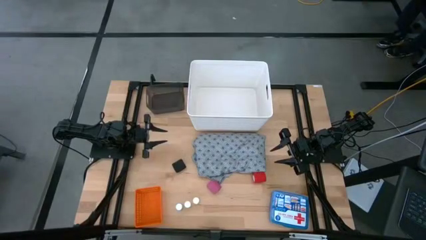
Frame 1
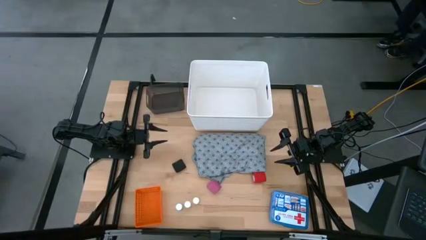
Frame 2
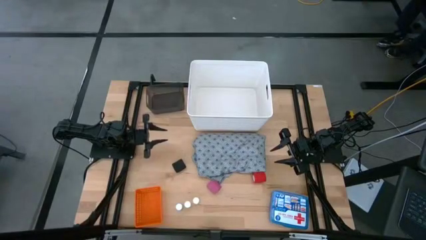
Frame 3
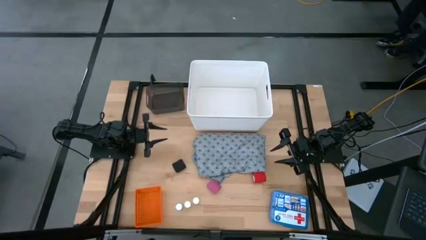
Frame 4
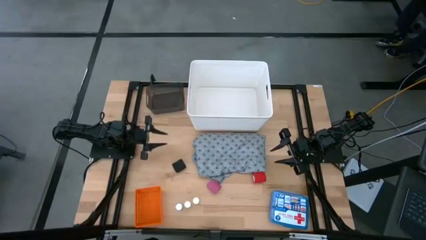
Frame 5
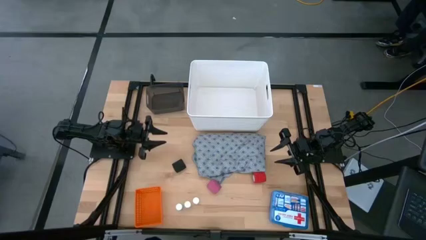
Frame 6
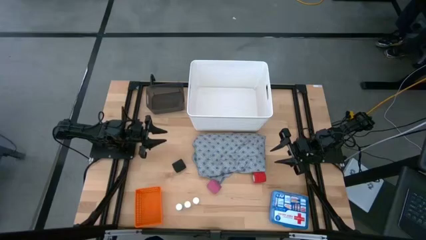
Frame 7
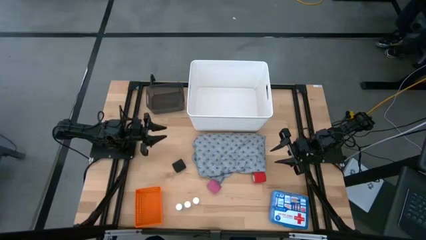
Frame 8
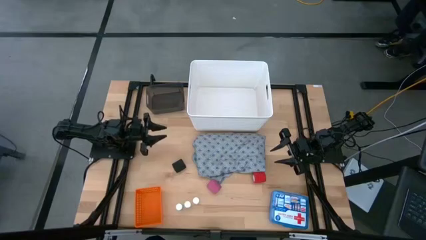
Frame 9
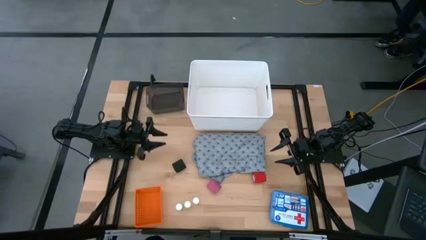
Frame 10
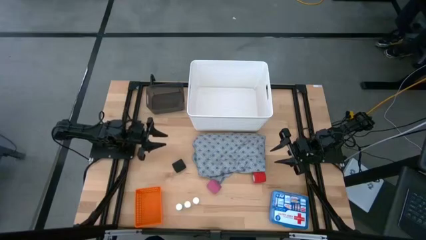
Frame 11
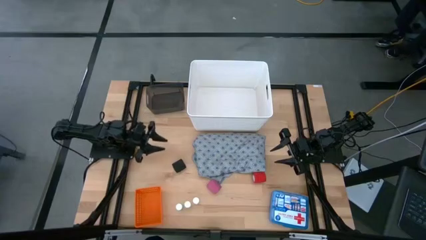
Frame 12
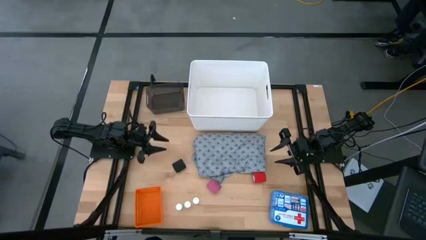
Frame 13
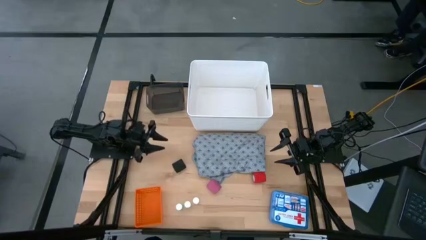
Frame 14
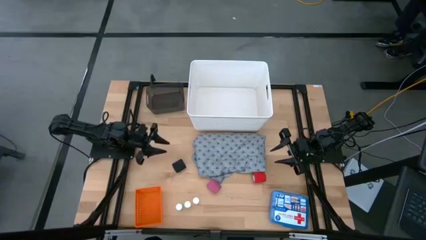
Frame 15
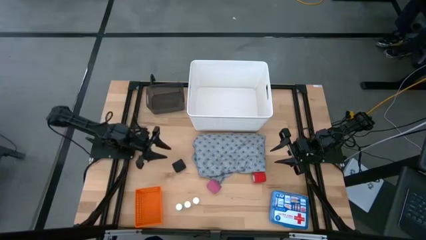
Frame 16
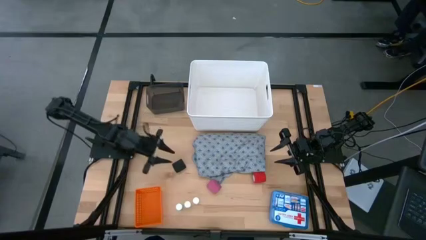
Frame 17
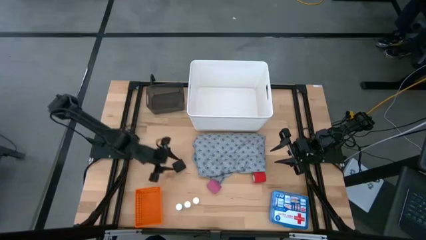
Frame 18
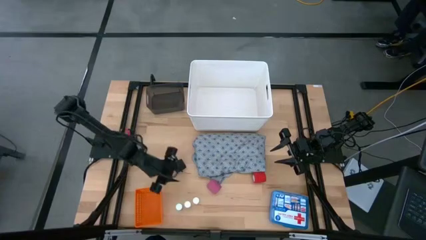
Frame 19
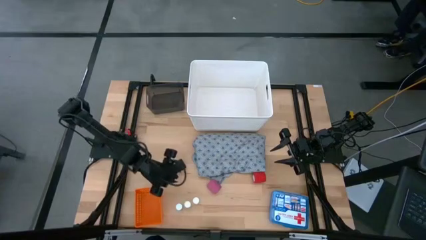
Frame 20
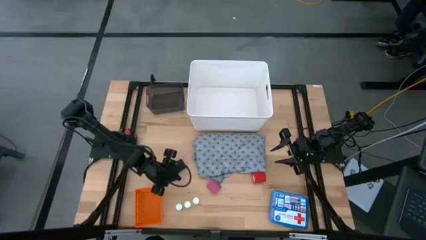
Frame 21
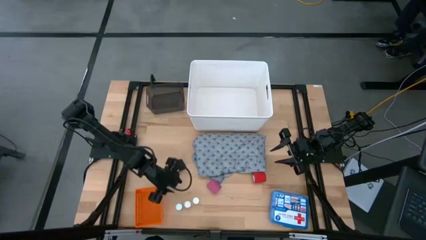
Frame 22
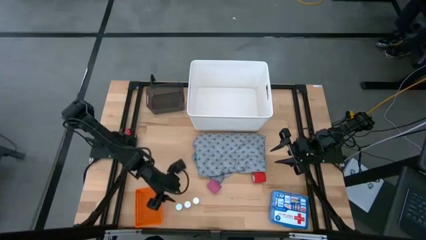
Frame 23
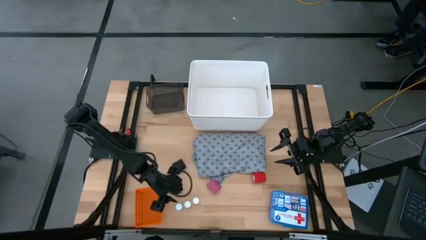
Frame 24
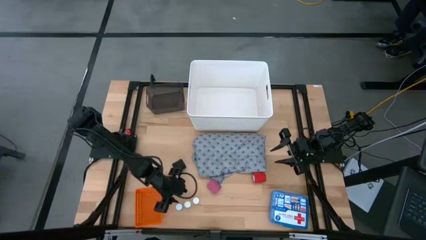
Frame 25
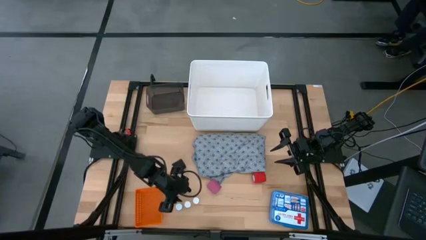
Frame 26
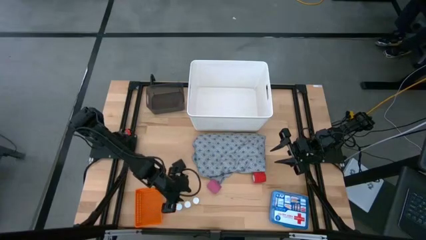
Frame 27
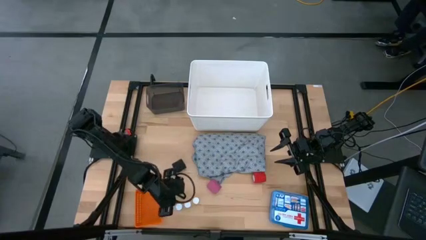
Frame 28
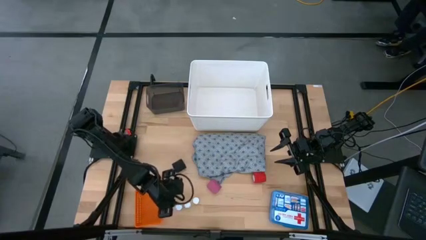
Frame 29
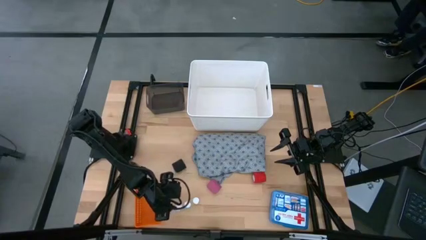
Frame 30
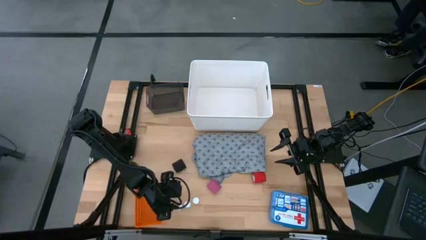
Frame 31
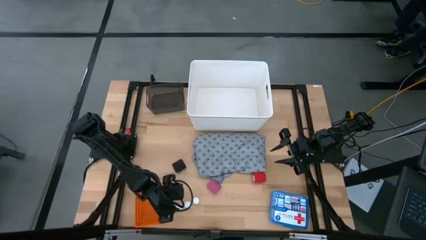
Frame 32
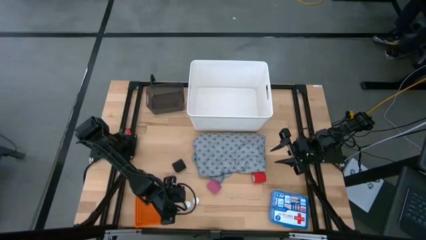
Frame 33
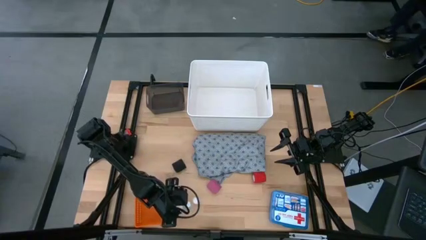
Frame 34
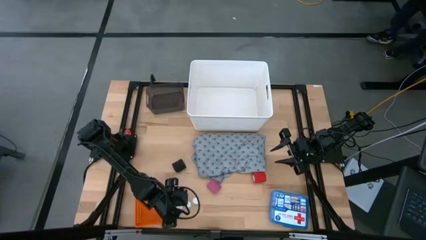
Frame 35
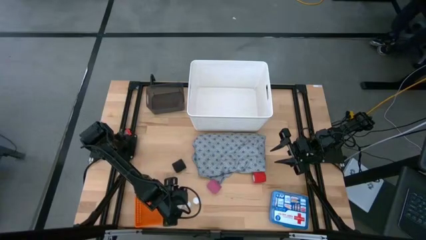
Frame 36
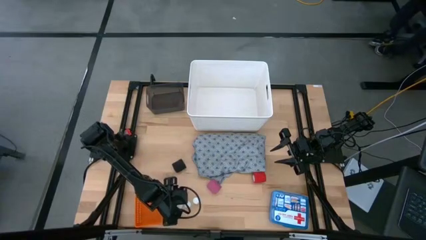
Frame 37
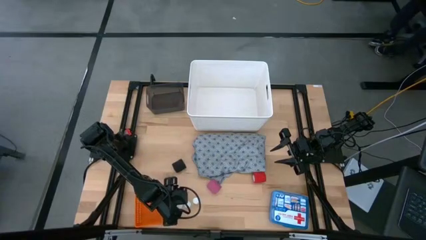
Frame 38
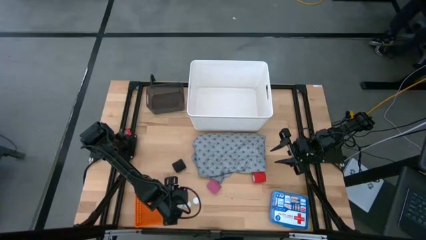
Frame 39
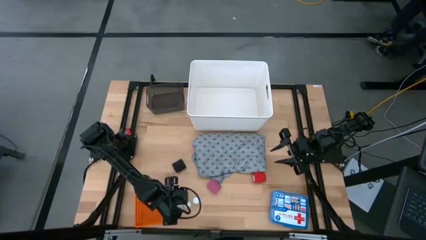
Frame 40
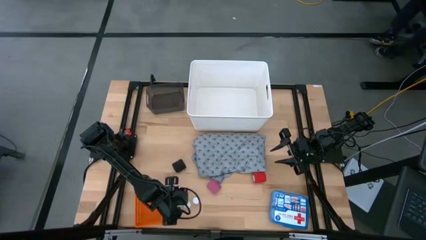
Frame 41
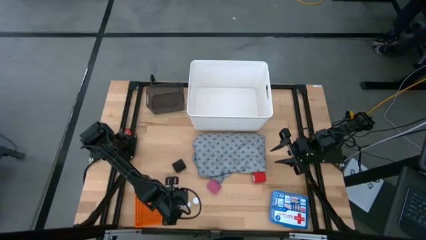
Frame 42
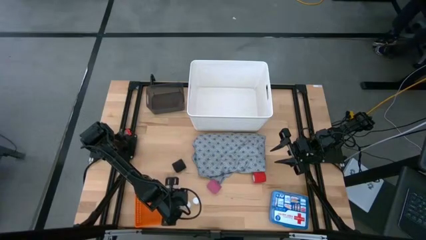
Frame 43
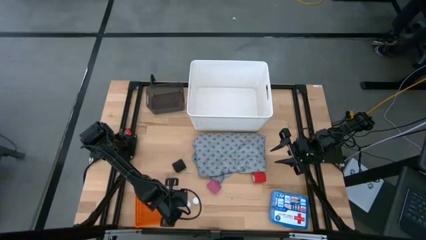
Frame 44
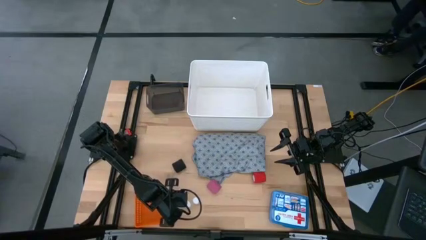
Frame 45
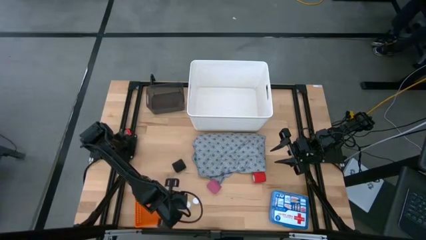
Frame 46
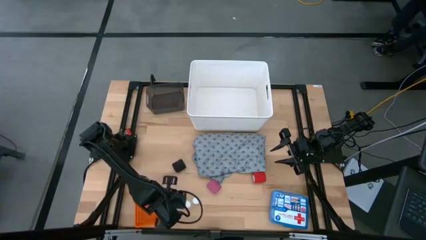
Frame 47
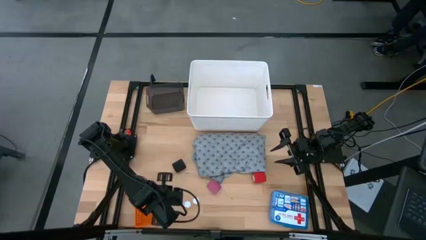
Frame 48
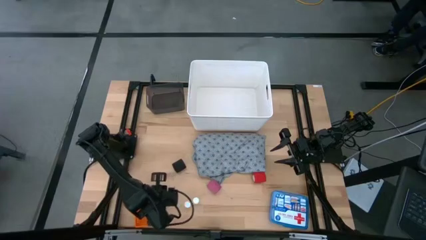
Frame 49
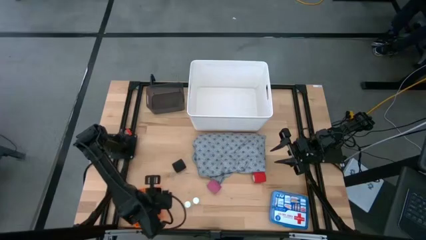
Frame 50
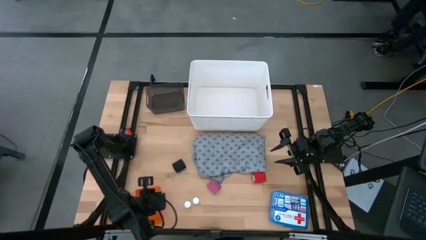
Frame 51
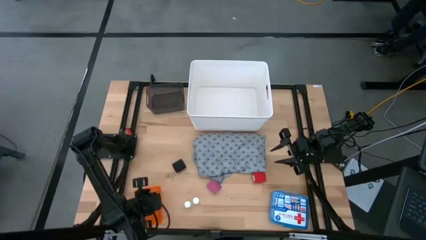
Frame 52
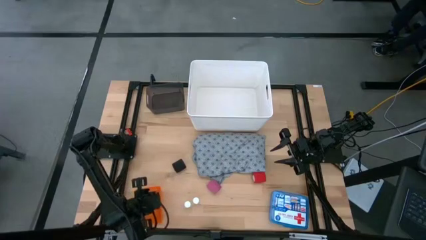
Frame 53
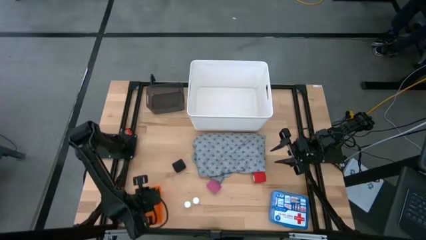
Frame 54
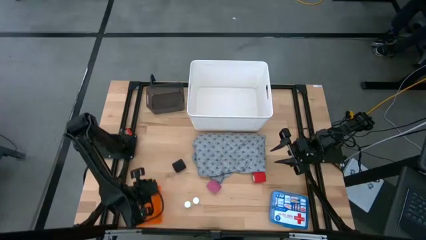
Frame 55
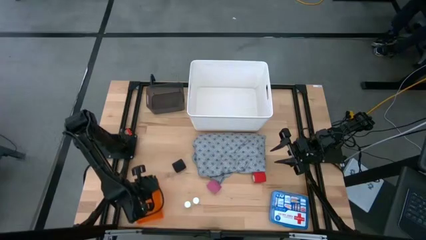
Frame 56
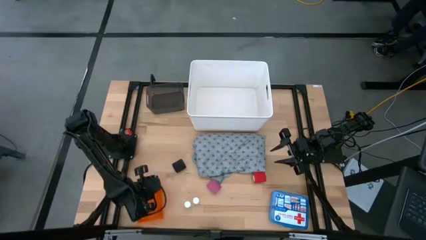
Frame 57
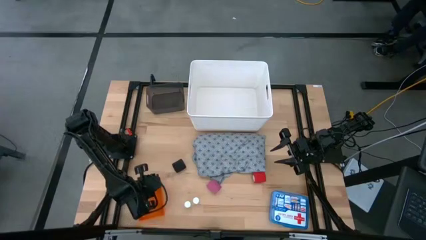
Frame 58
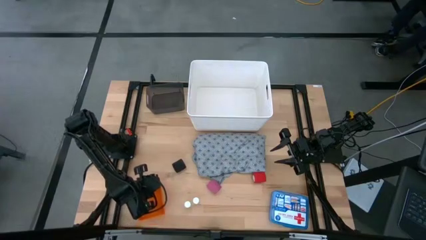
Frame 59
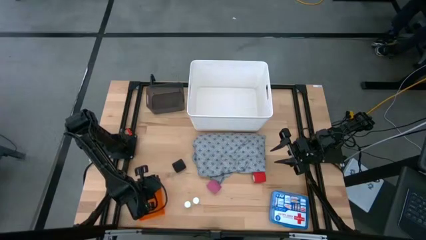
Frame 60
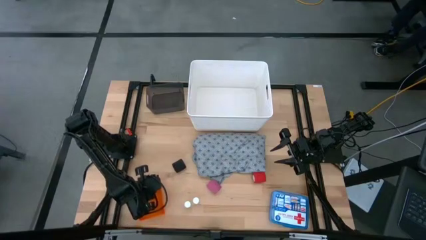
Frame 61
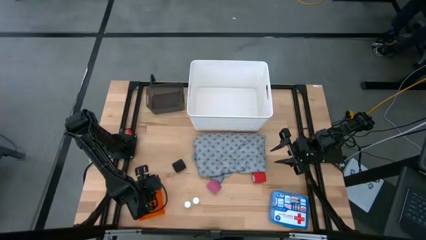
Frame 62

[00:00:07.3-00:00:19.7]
Task: Pick & Place Medicine items
Put the blue pill bottle into the orange bin
